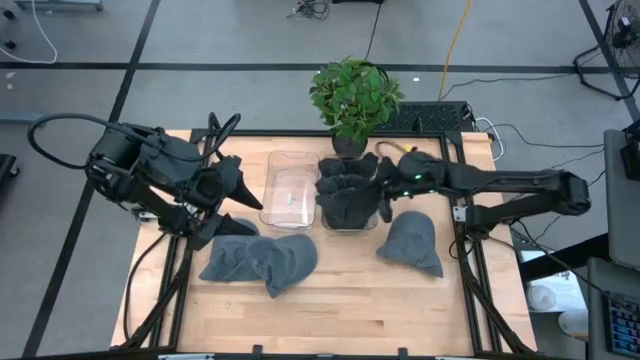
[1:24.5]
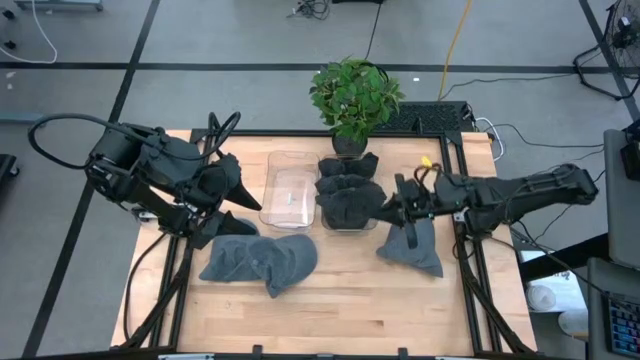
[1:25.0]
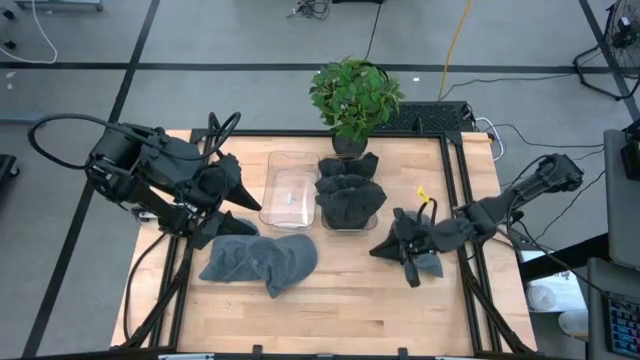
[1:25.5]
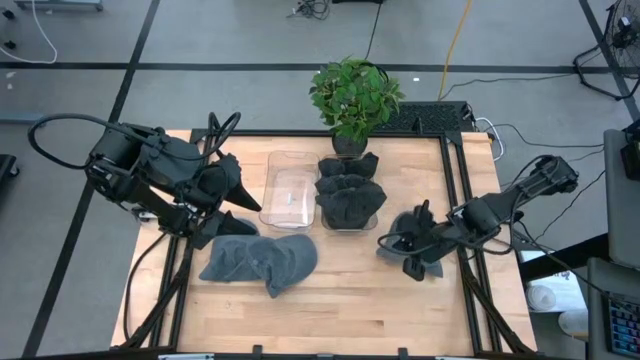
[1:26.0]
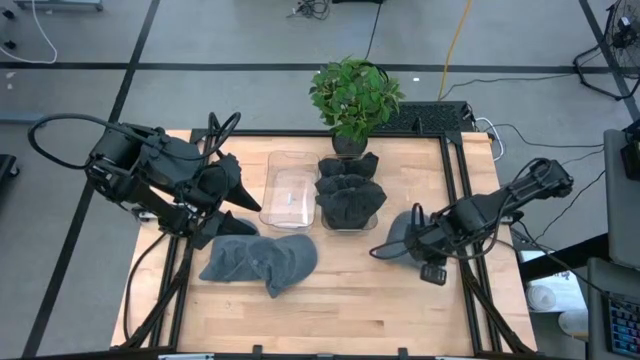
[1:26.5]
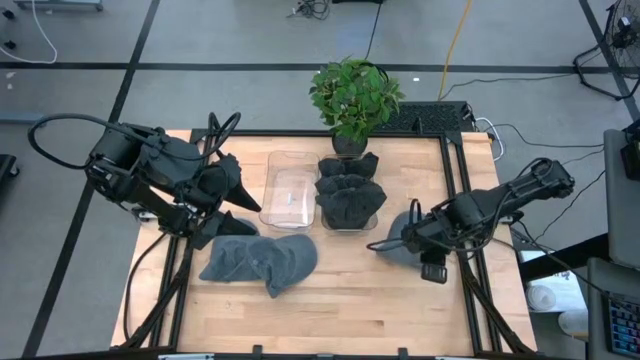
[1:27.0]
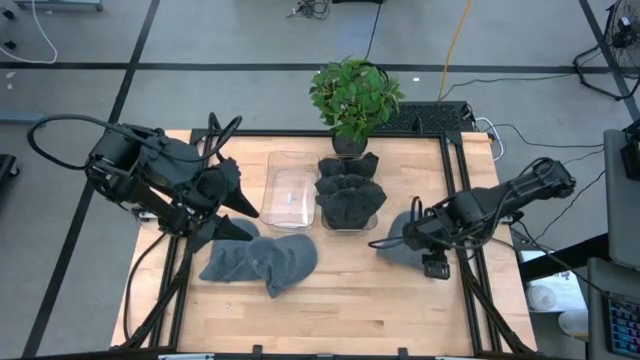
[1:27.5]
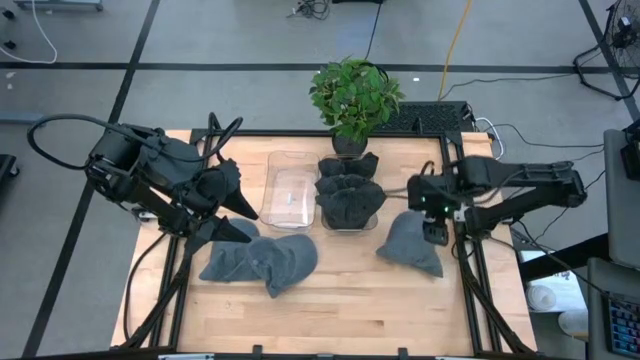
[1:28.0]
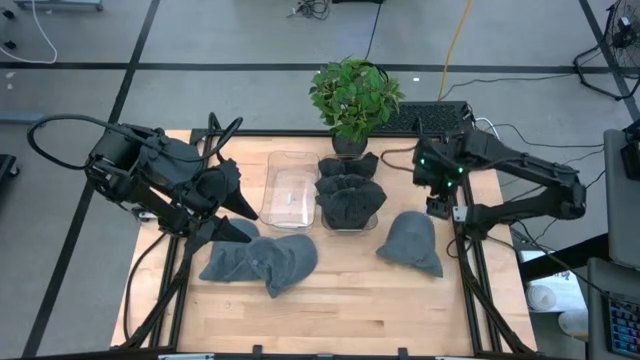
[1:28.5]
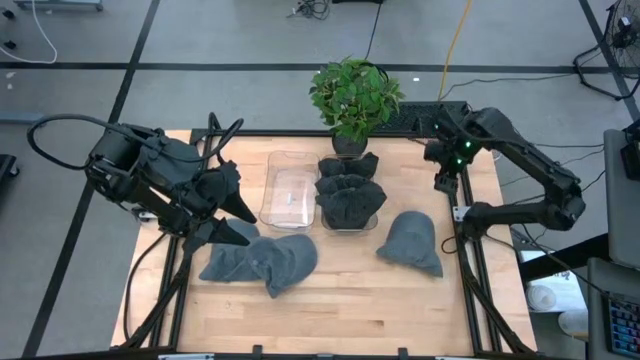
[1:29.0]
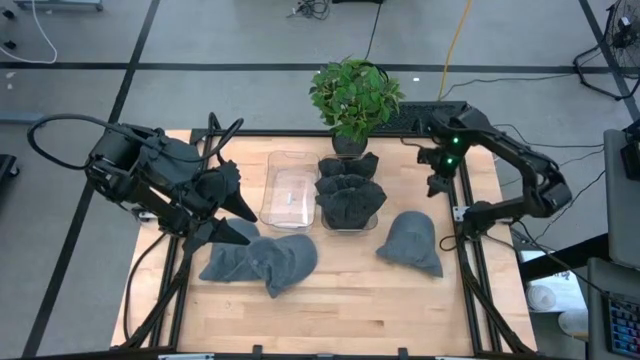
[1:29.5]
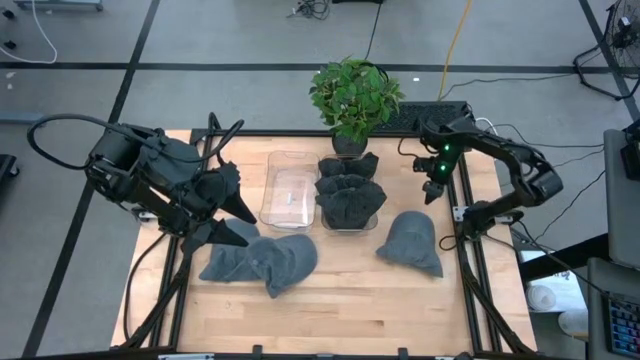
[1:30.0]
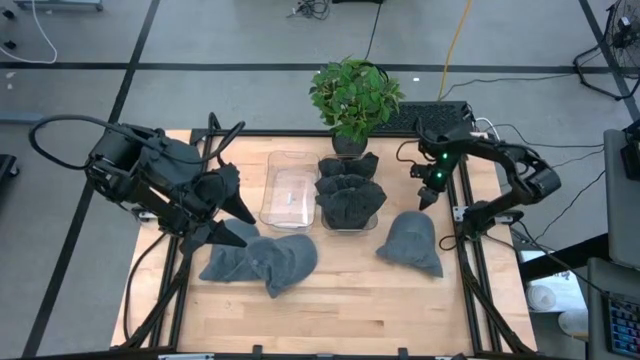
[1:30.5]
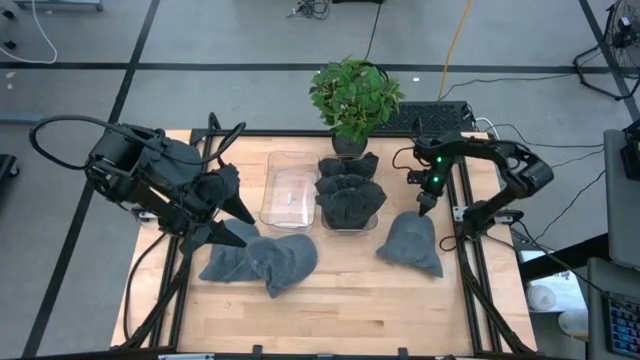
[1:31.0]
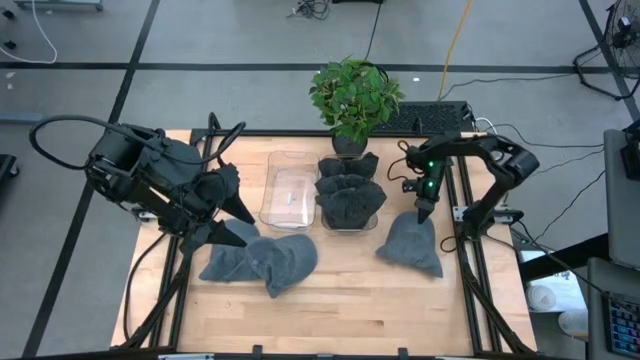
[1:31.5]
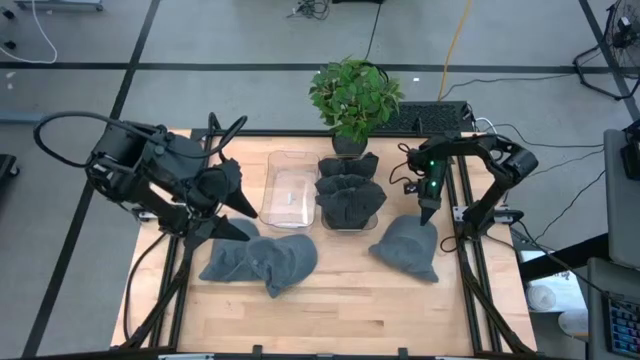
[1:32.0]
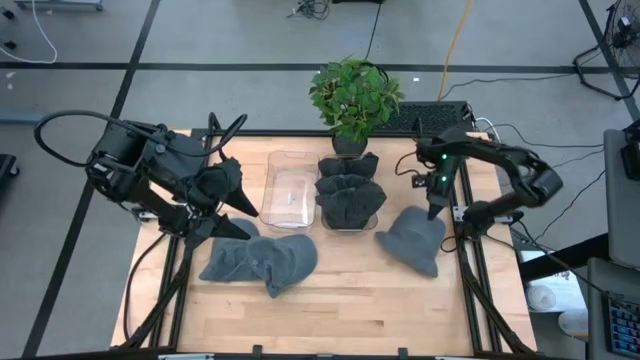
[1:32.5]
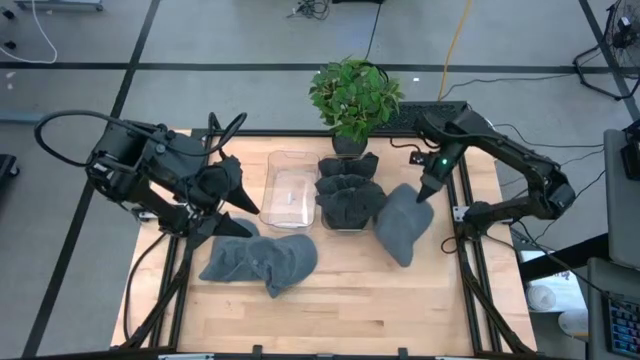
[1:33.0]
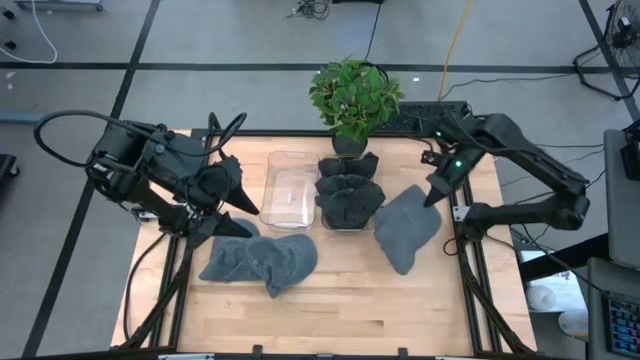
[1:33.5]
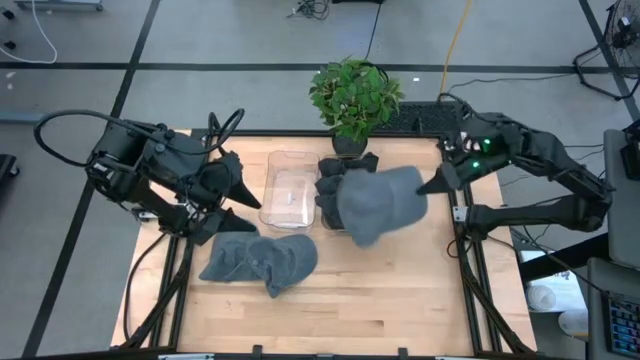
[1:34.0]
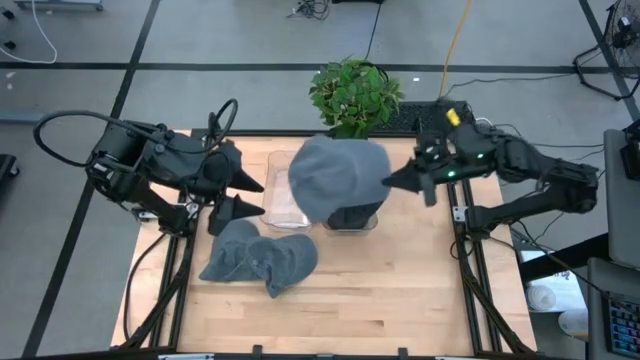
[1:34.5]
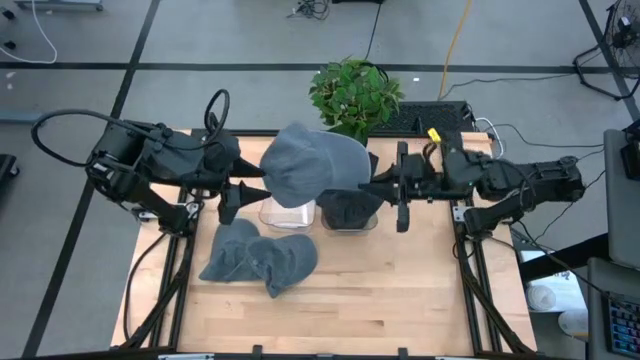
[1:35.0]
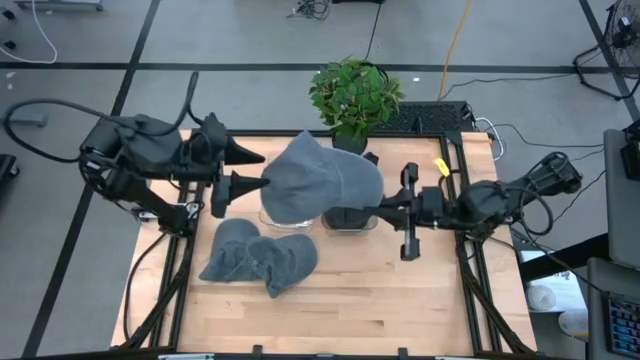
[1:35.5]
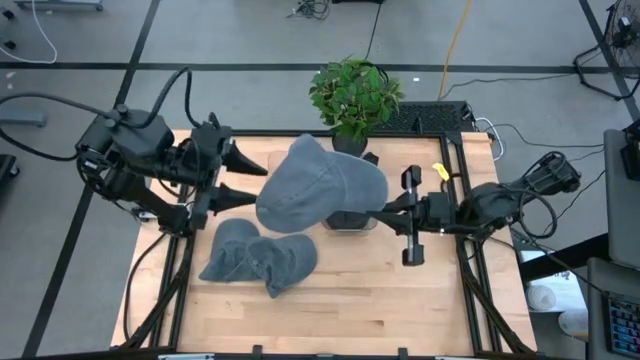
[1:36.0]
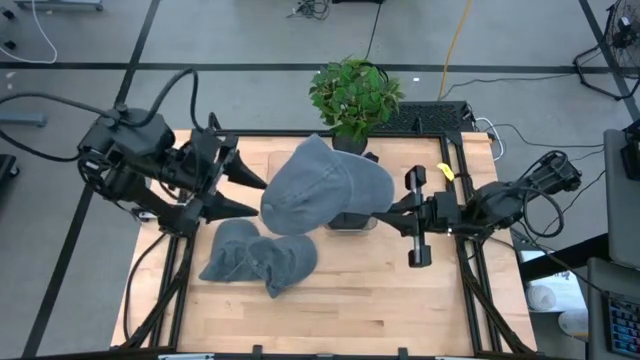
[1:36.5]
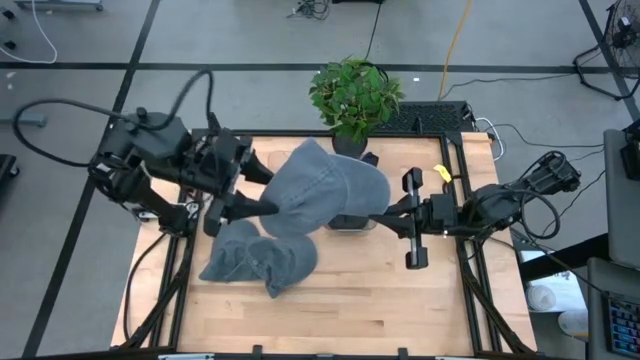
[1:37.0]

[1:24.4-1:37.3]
Task: Pick & Place hat
Put the right blue cap into the left transparent bin

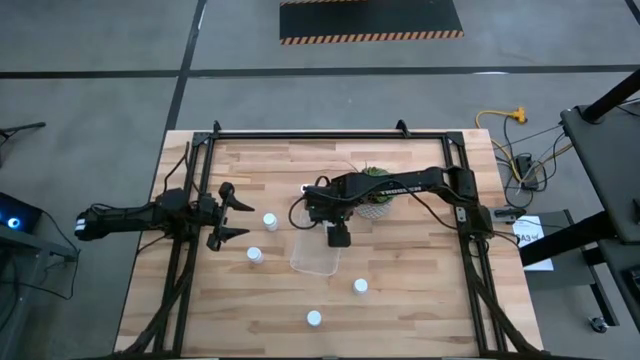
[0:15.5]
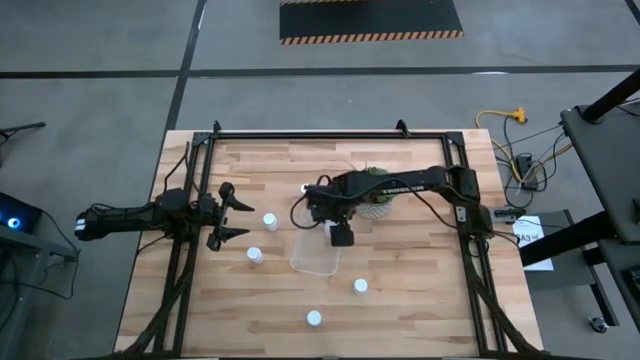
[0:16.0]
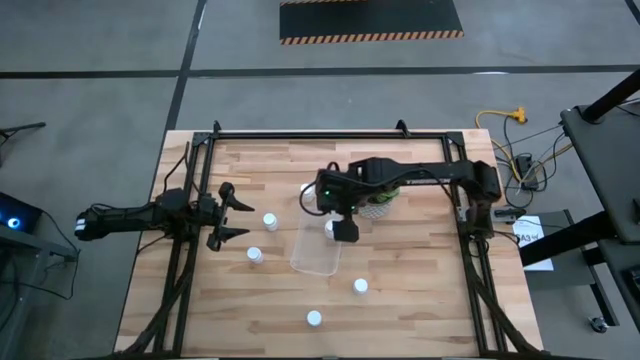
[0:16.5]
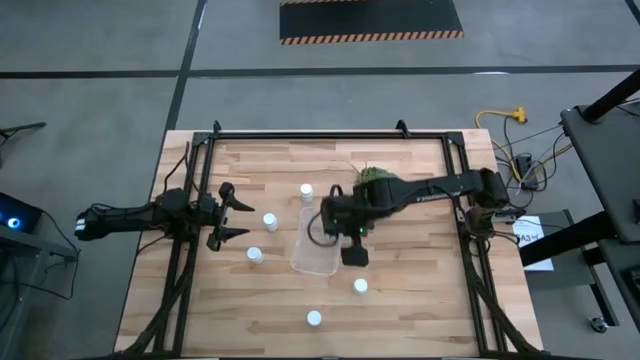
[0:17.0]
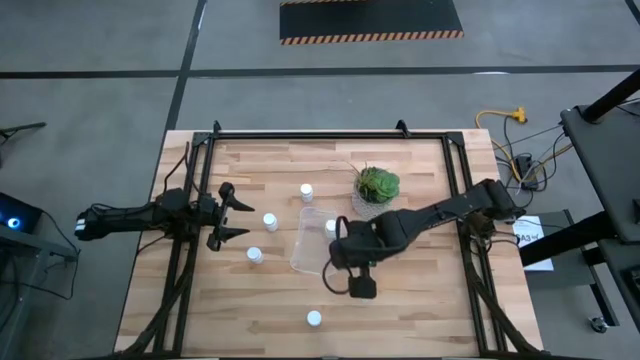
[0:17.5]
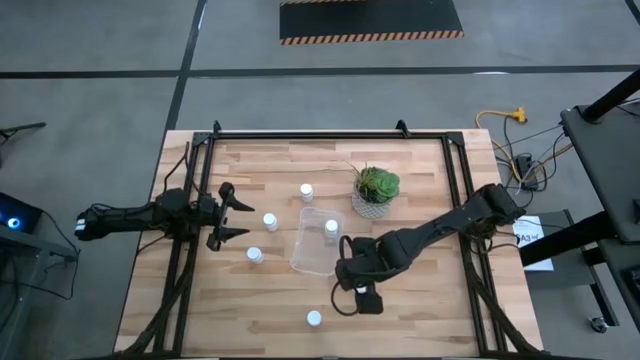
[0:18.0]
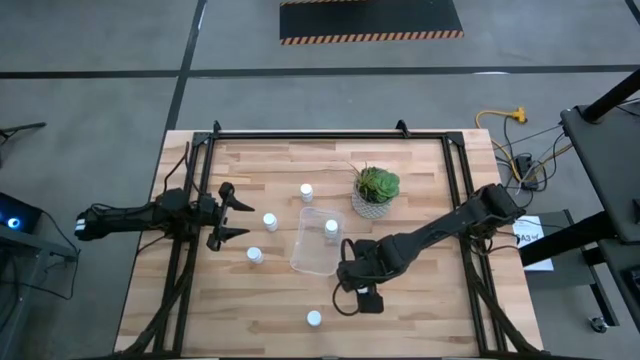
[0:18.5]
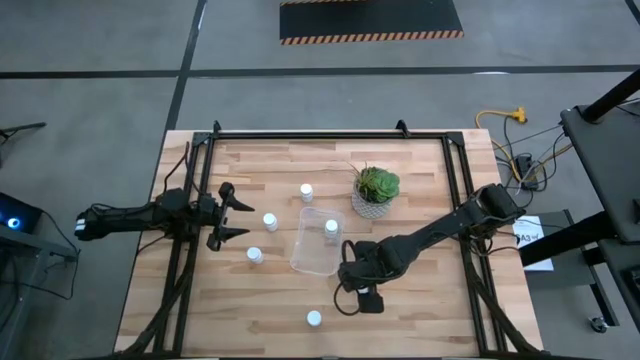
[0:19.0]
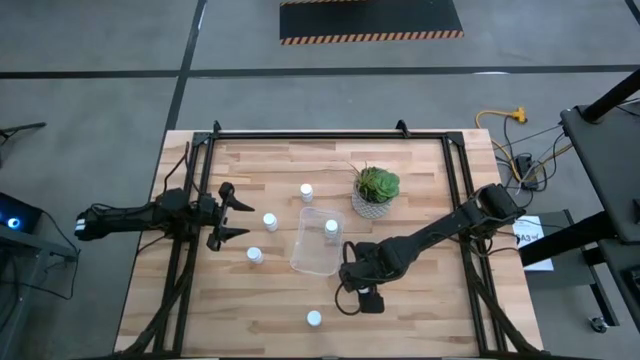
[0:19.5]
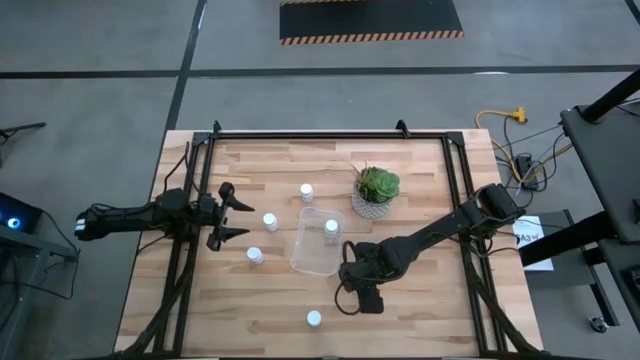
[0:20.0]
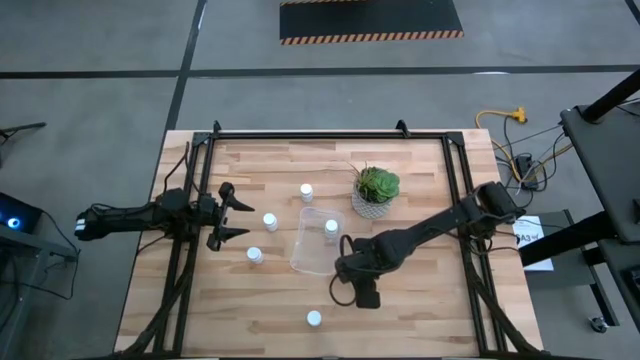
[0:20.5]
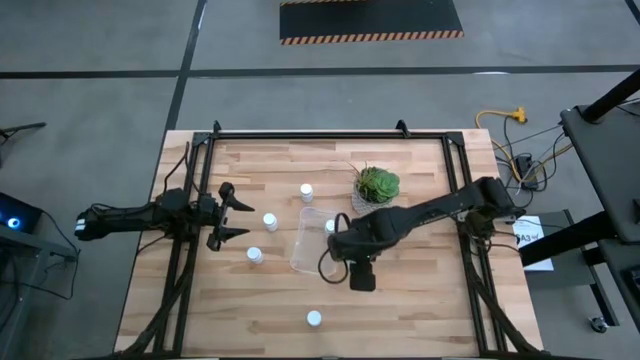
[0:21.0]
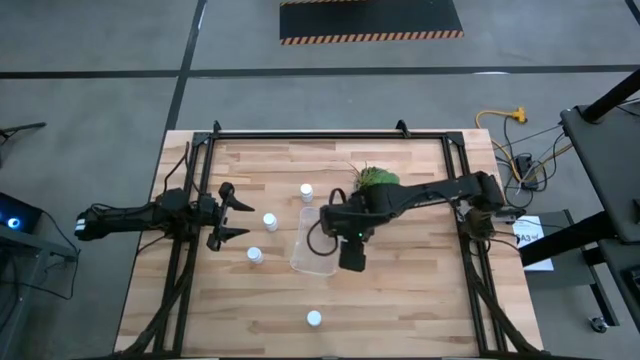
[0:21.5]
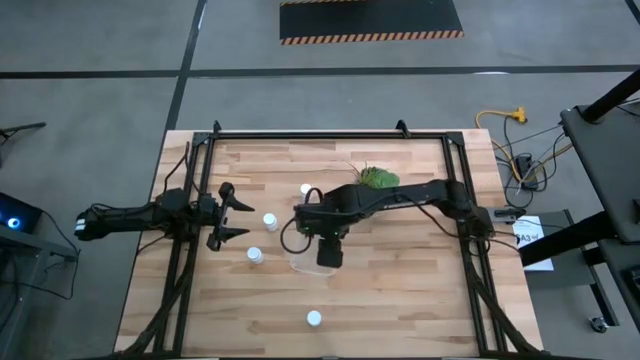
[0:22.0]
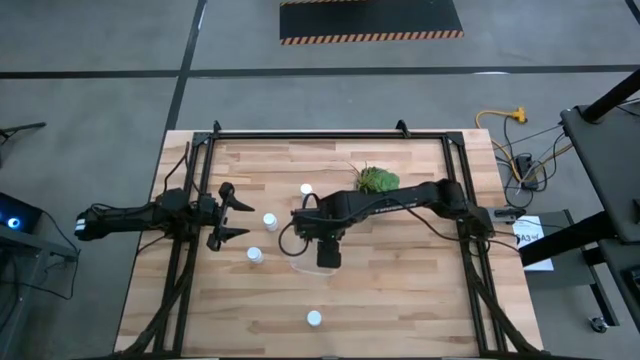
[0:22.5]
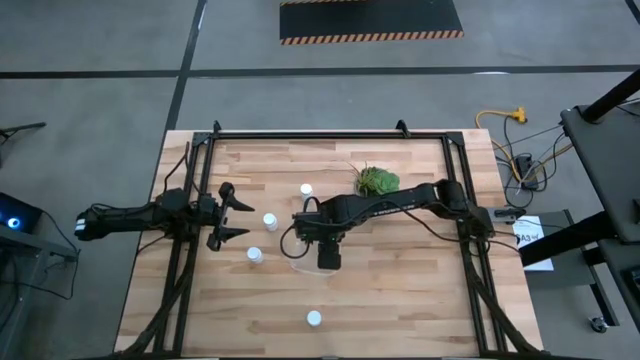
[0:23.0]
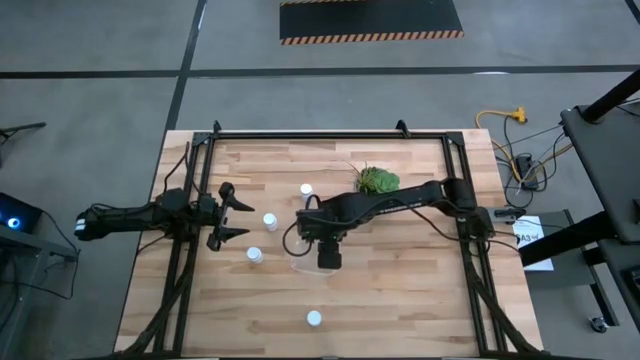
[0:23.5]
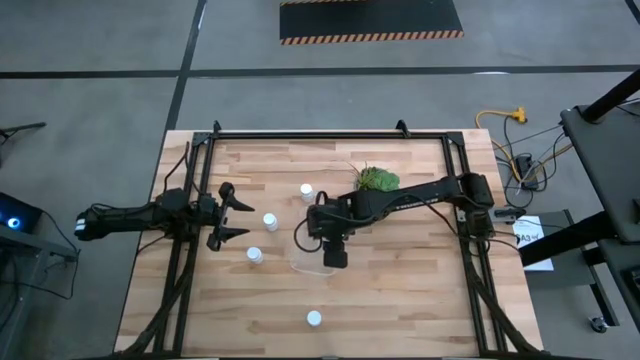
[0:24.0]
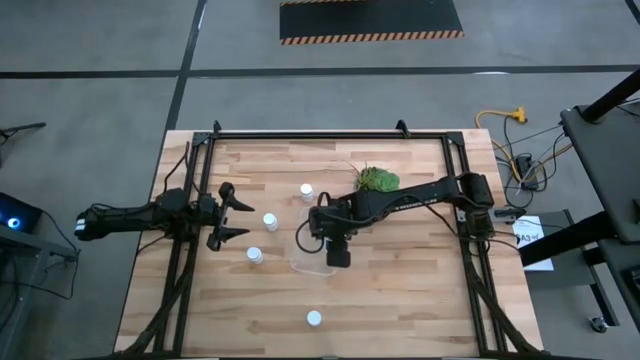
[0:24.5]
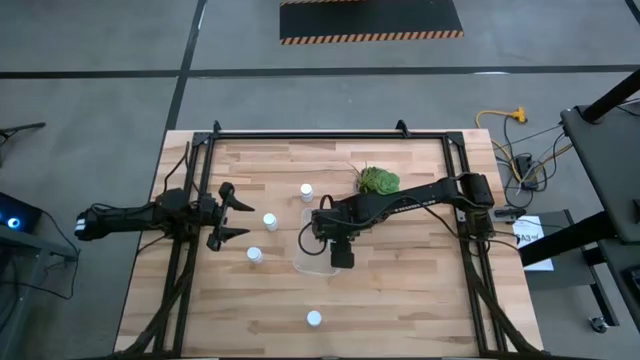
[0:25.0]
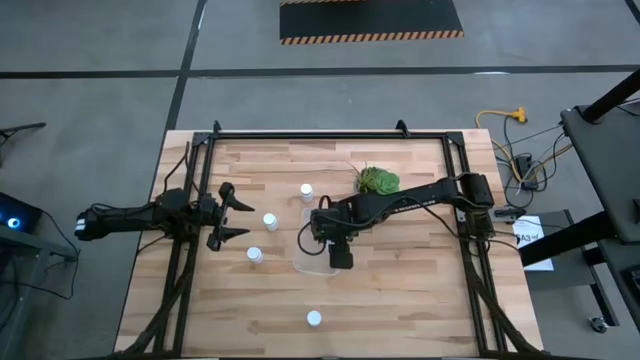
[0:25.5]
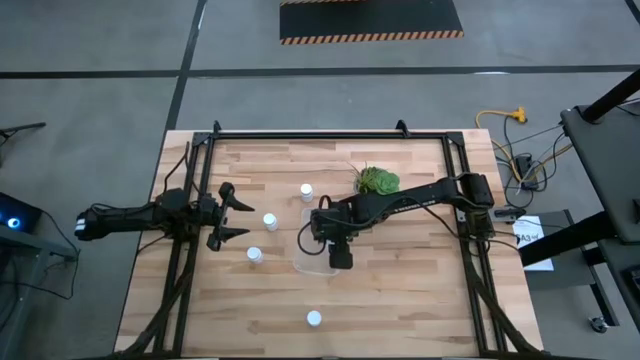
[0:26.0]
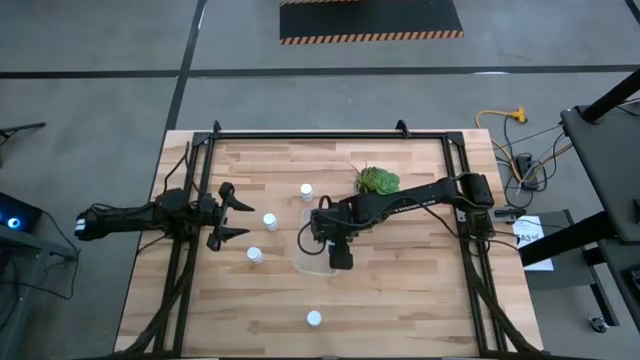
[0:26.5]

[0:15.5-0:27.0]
Task: Pick and place pill bottles into a basket
Put the white medicine bottle into the transparent bin
